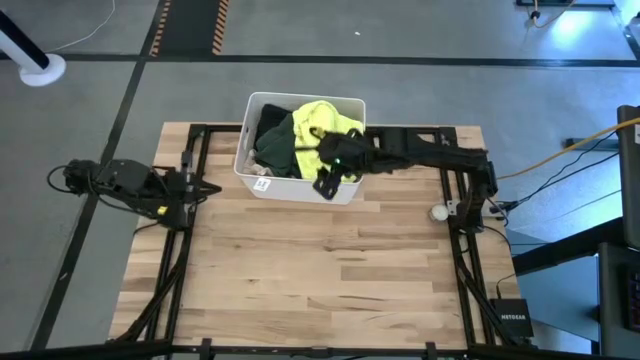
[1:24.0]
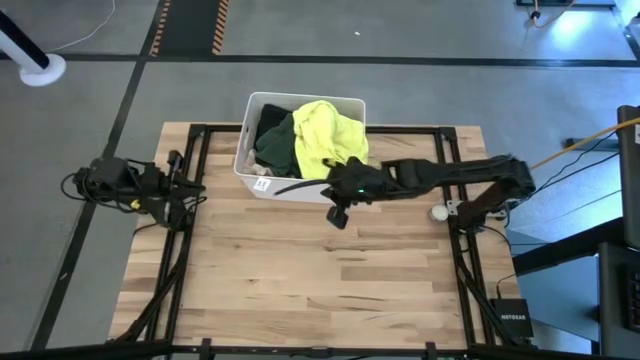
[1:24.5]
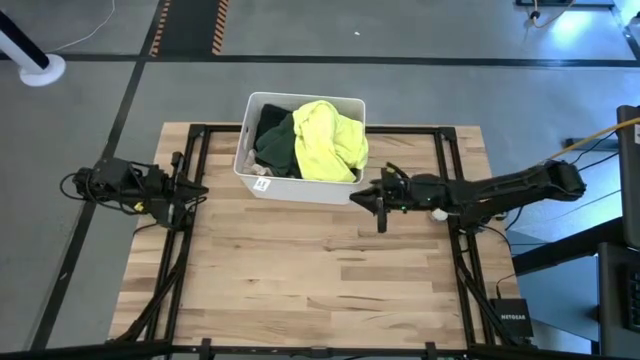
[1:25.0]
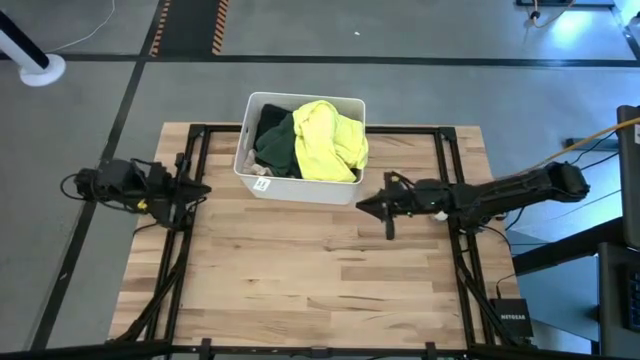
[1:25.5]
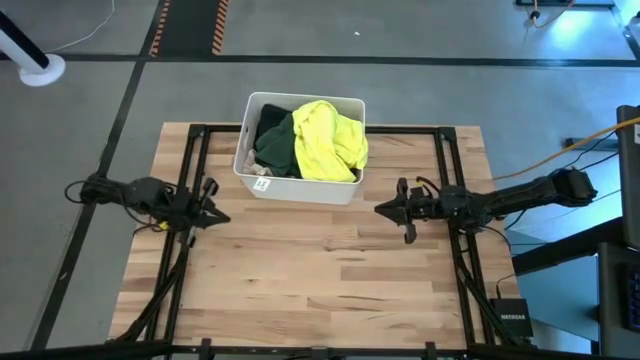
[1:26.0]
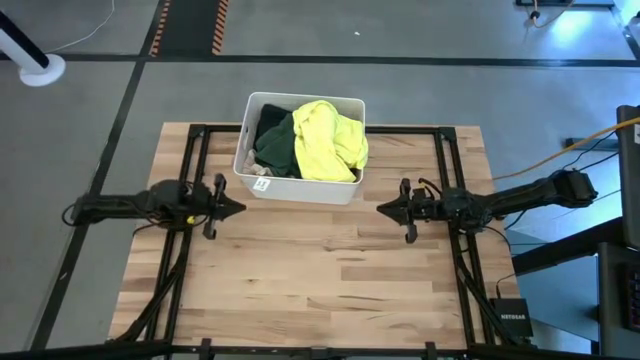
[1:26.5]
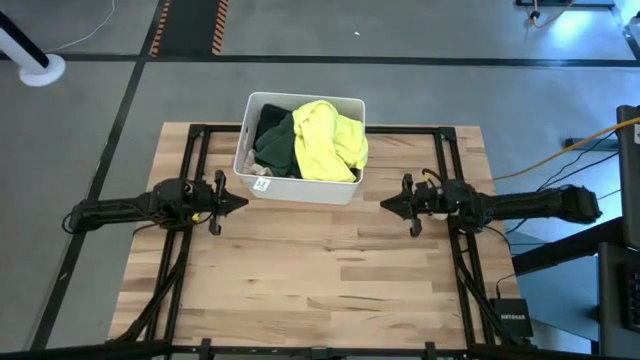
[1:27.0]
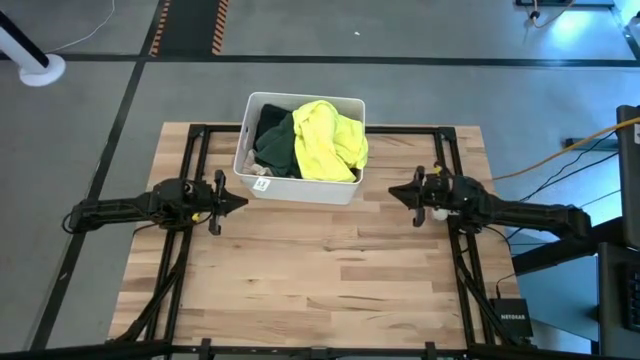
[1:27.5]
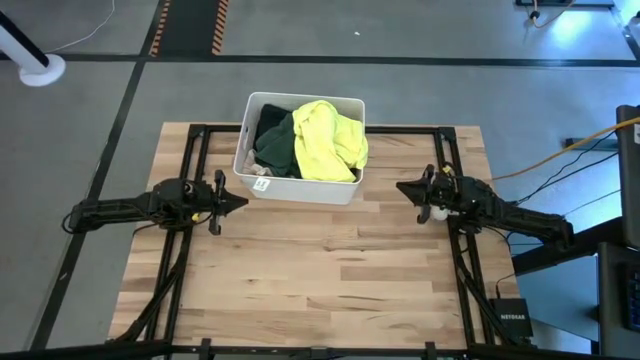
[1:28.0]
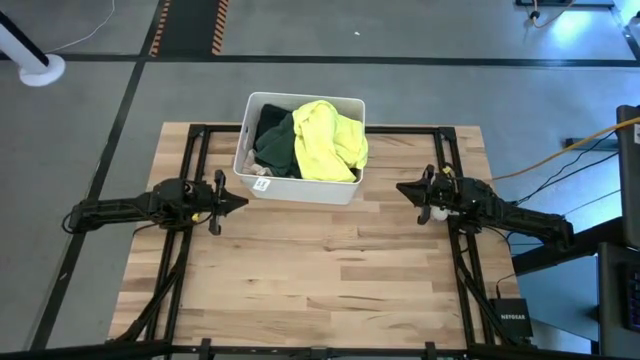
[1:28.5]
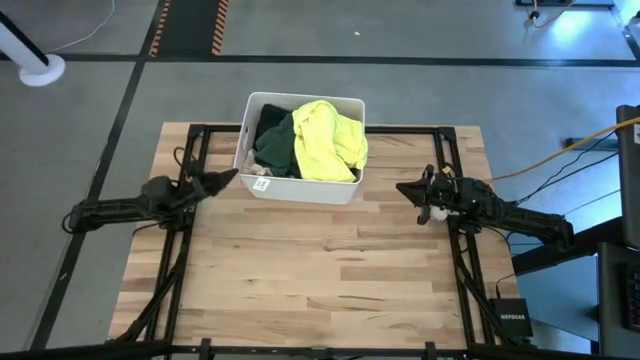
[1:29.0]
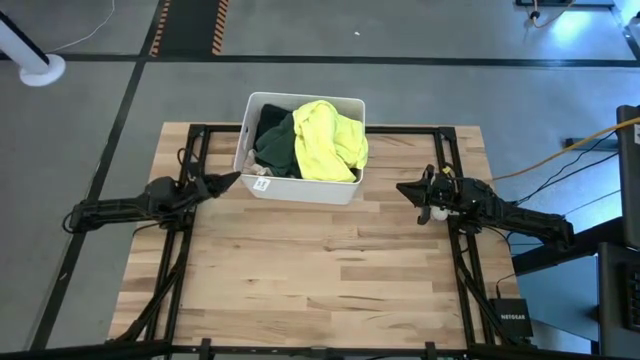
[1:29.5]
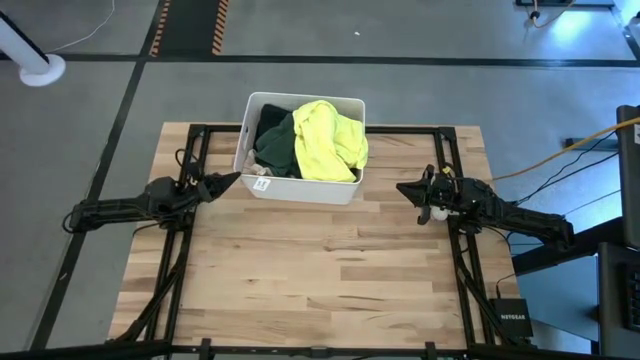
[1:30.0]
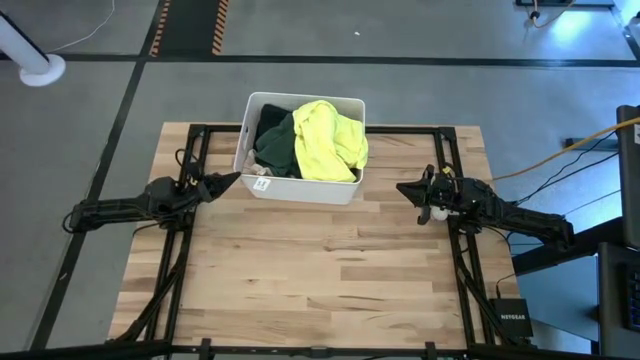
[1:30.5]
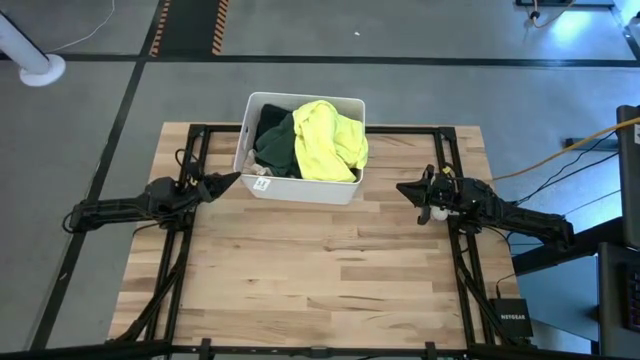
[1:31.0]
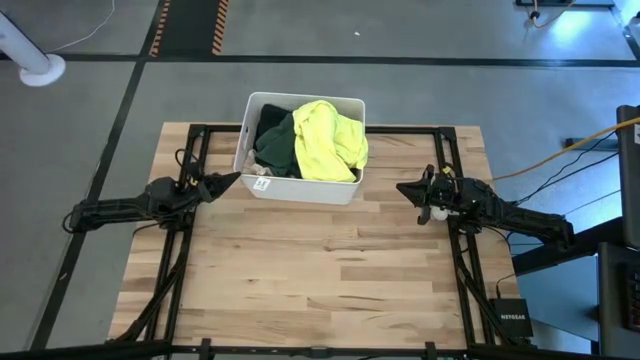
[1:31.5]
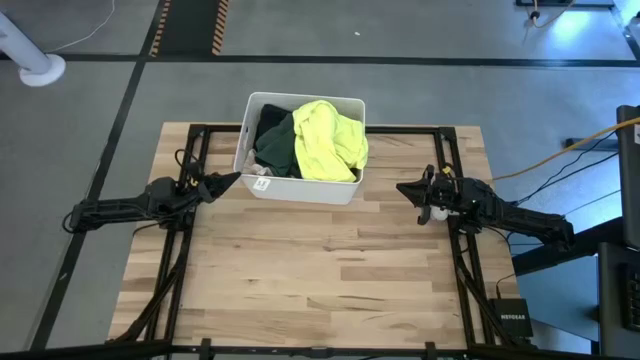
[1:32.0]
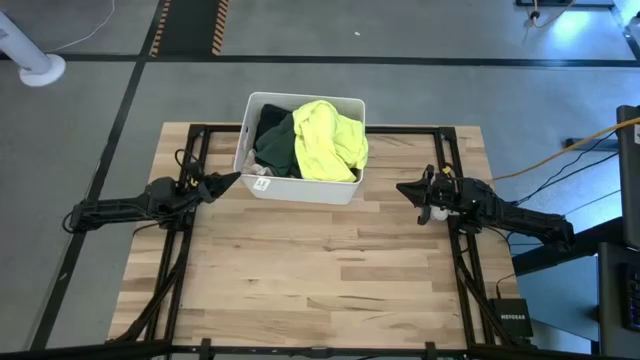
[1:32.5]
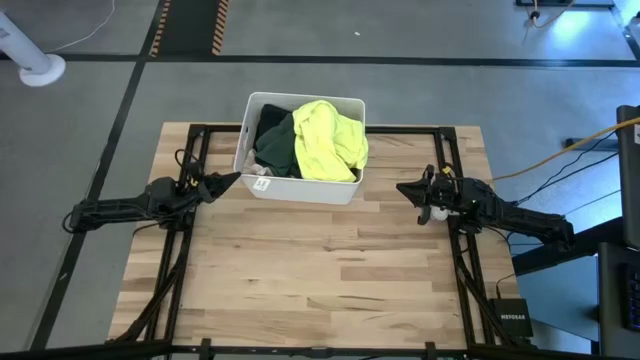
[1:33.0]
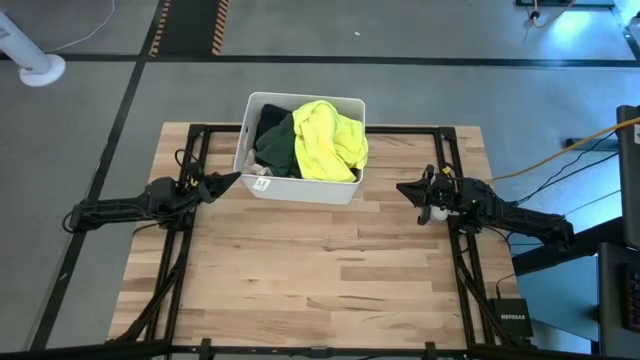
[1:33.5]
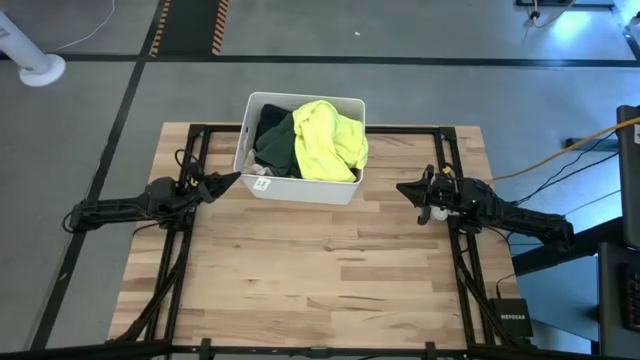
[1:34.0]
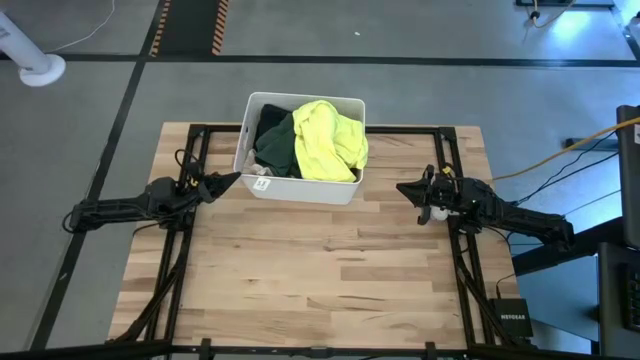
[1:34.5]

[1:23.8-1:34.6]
Task: Sort clothes
Return to Home Position

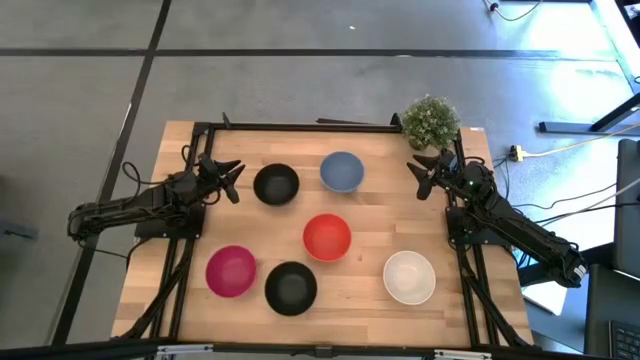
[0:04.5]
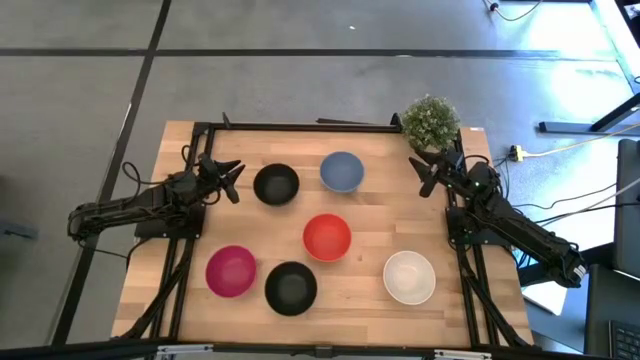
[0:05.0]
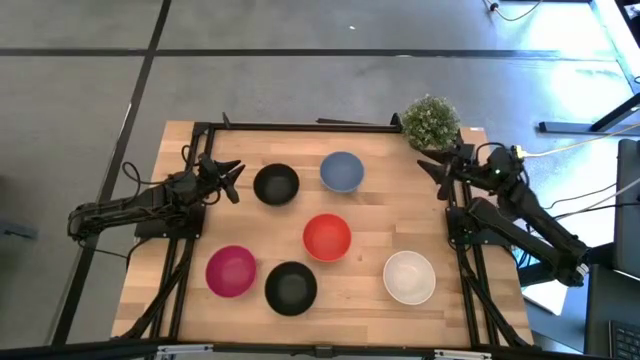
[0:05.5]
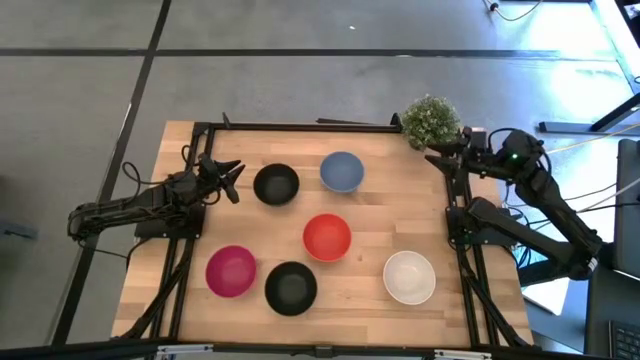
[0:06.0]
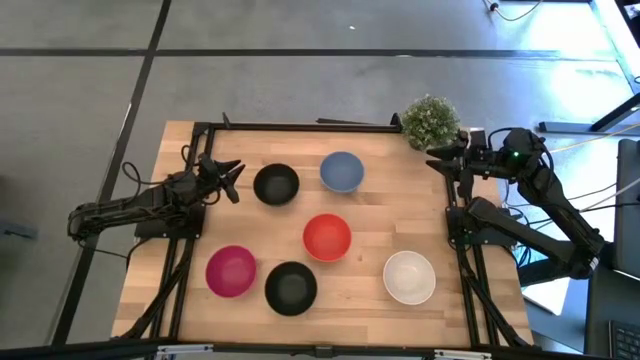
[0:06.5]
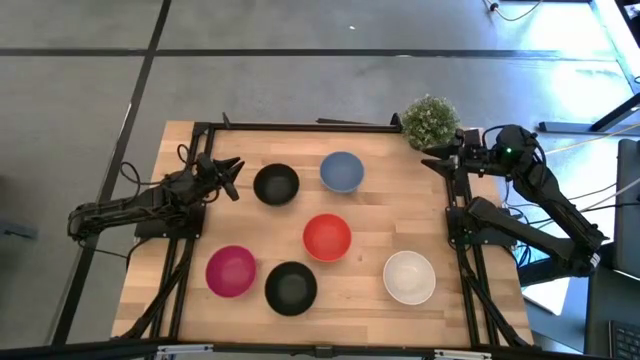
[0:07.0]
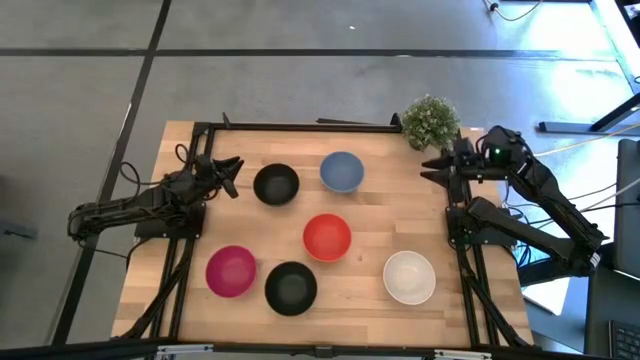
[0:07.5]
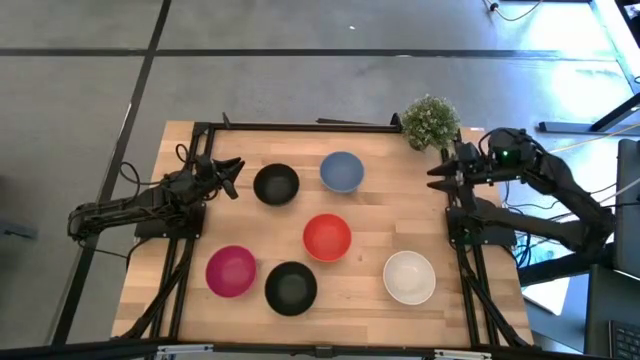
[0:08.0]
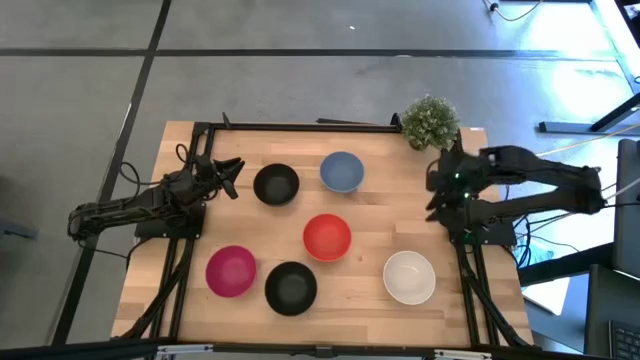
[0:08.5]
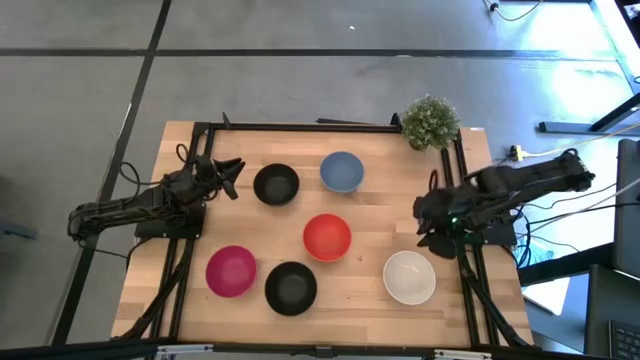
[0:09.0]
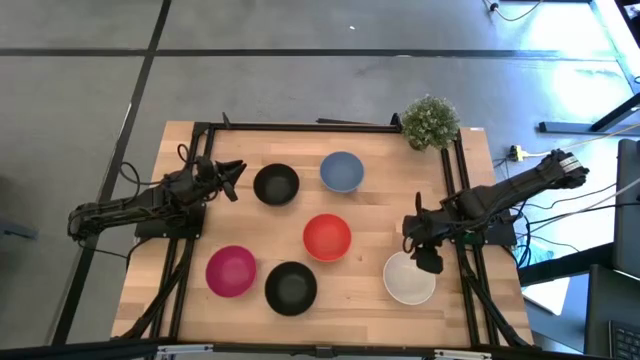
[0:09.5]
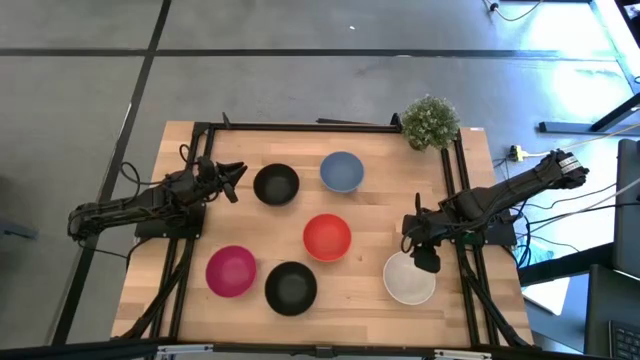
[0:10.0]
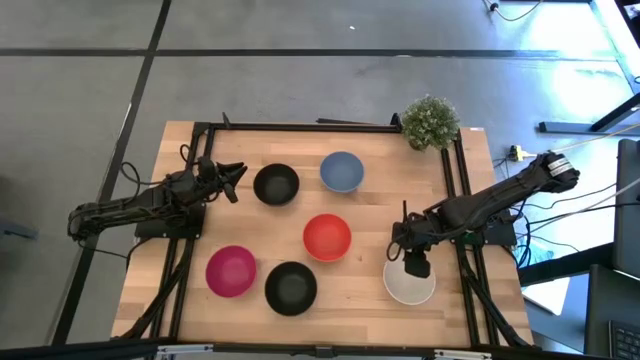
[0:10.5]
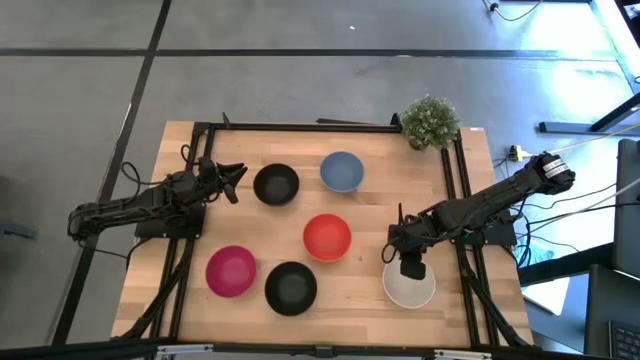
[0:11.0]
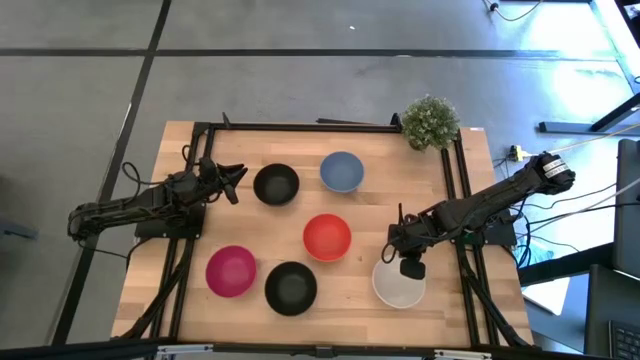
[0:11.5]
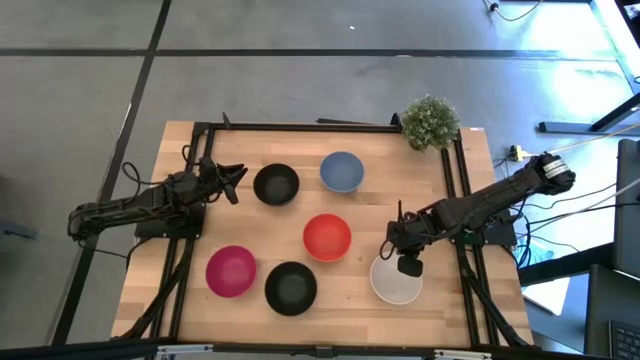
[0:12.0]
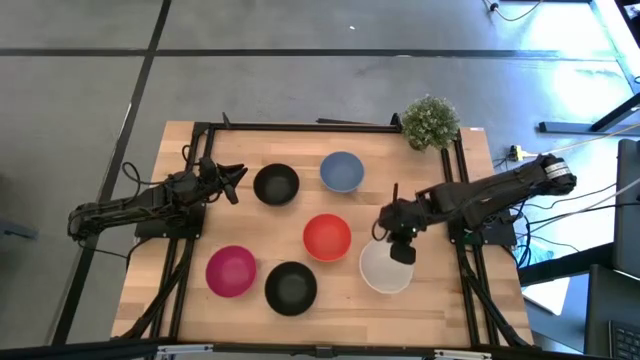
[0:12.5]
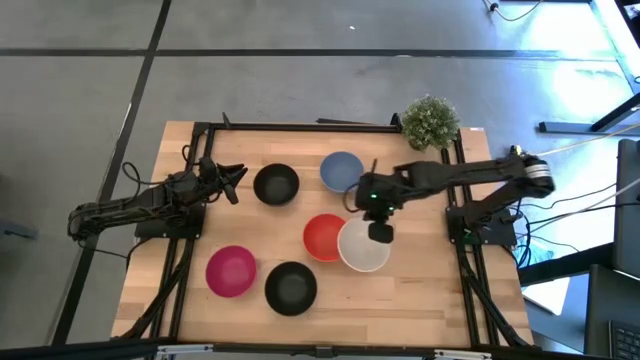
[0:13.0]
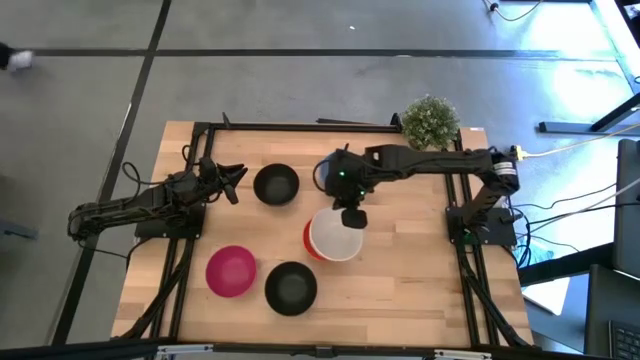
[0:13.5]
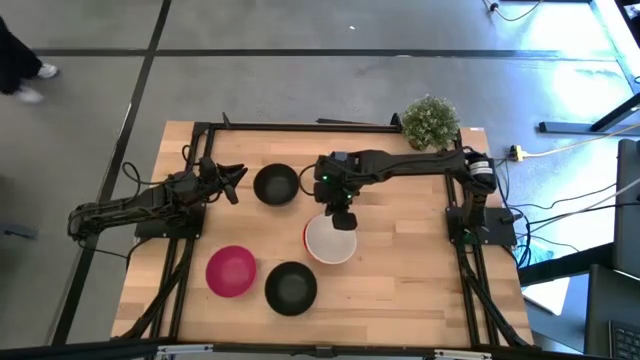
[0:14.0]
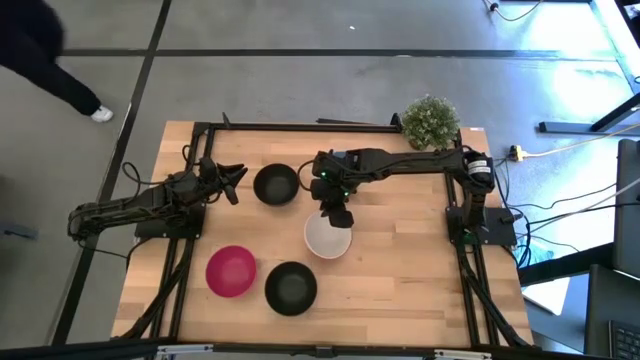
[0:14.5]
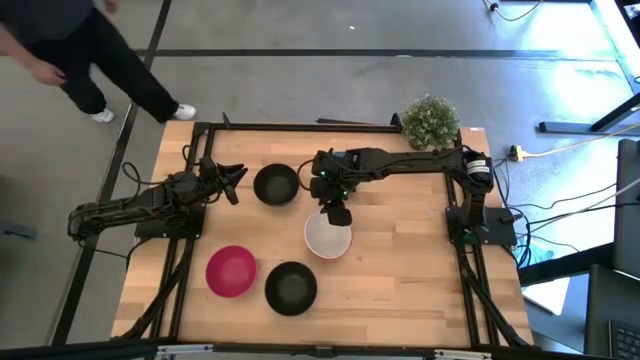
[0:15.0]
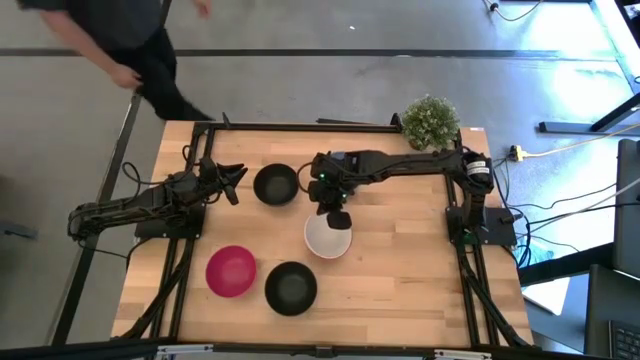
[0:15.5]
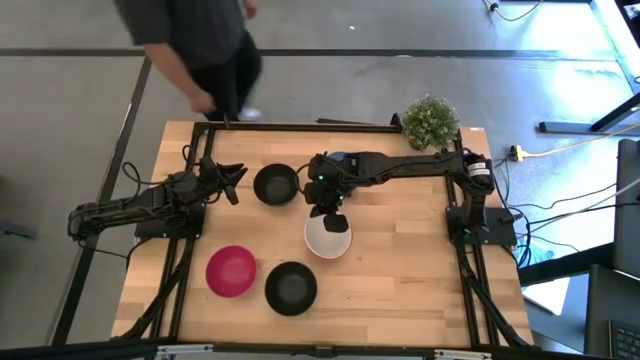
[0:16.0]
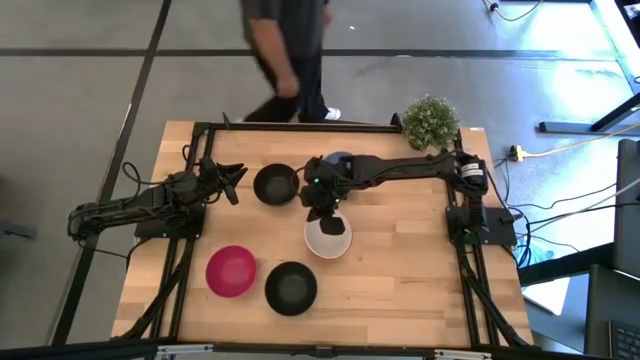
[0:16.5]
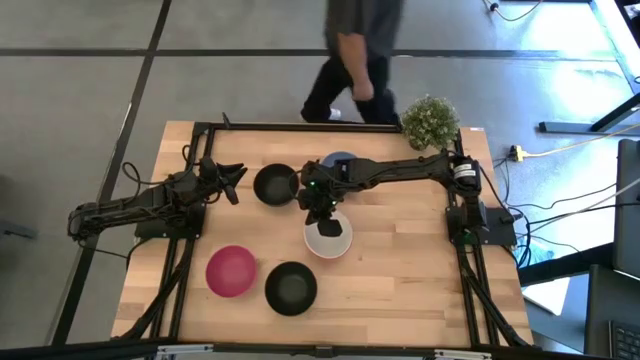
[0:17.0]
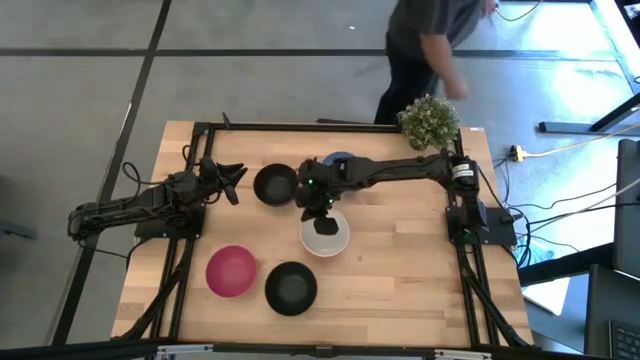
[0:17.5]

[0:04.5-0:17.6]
Task: Nest bowls inside each other
Stack the white bowl on top of the orange bowl
